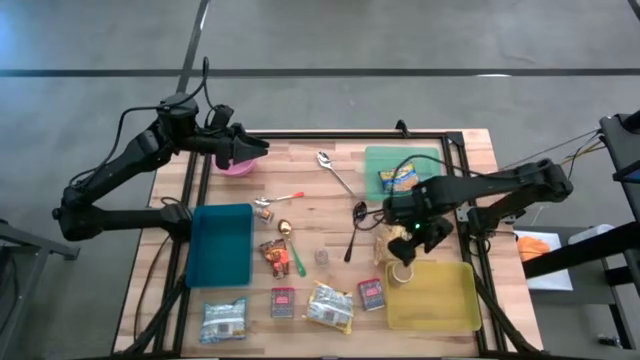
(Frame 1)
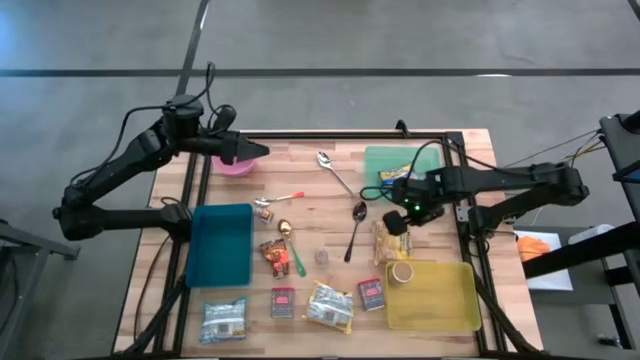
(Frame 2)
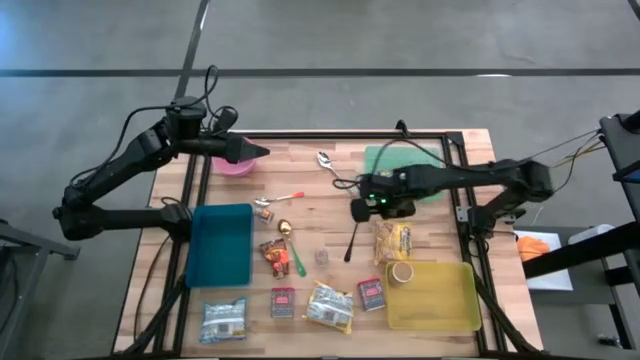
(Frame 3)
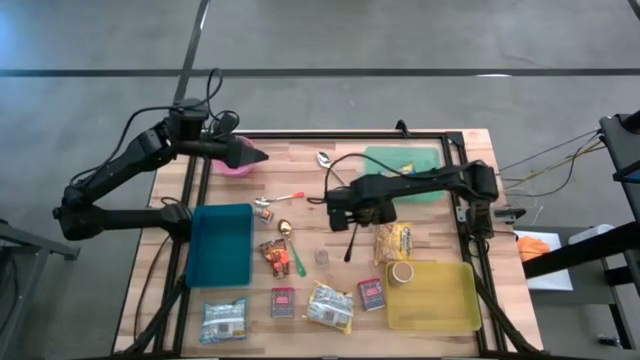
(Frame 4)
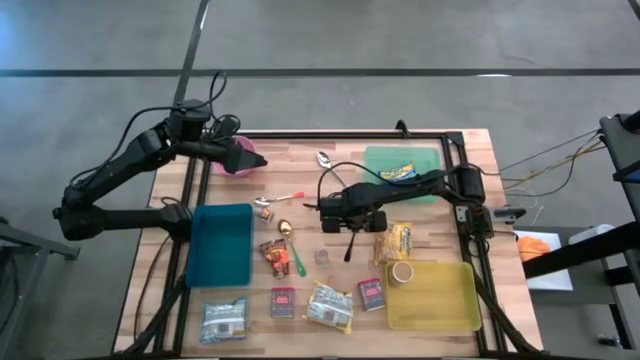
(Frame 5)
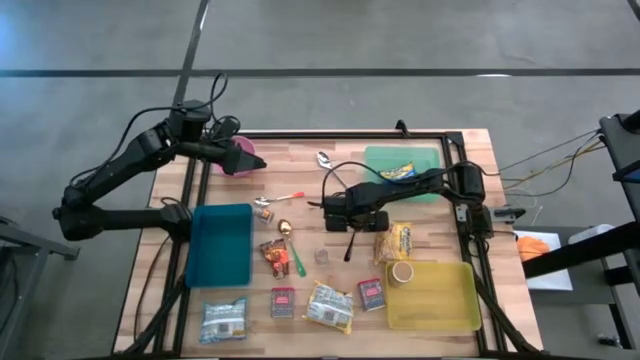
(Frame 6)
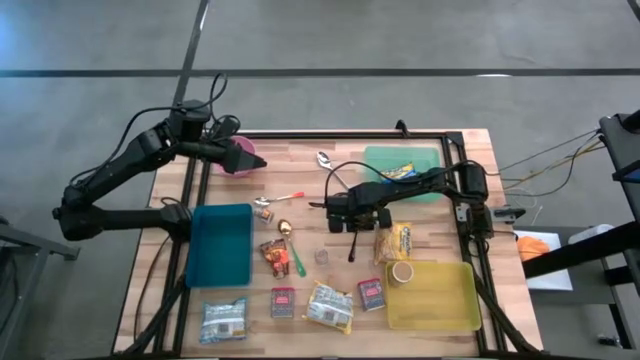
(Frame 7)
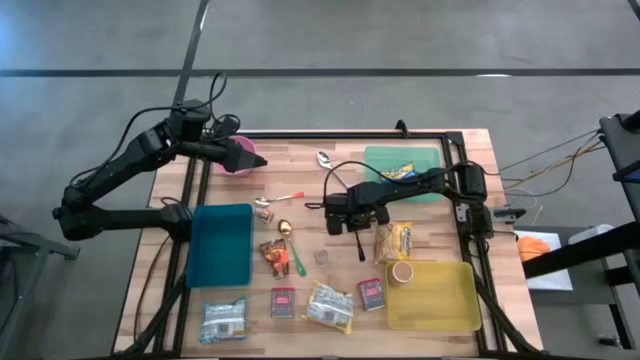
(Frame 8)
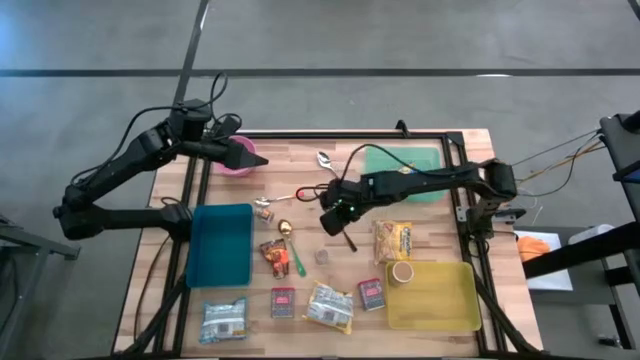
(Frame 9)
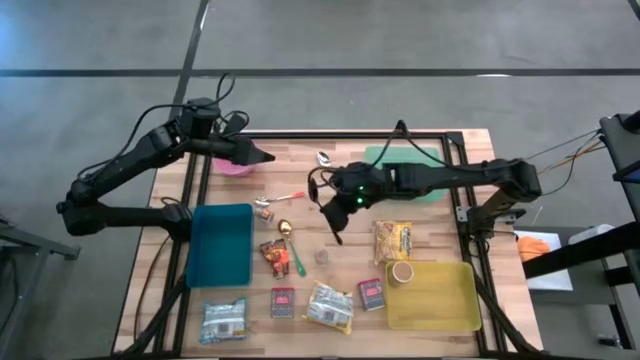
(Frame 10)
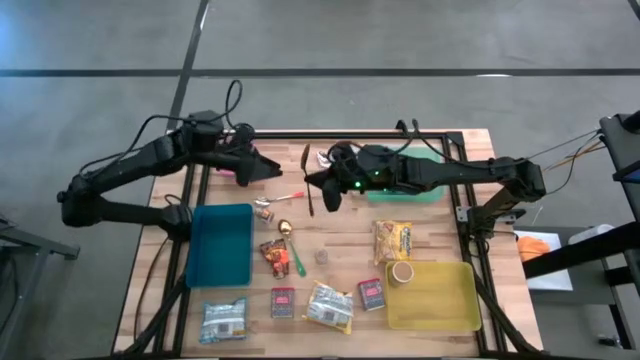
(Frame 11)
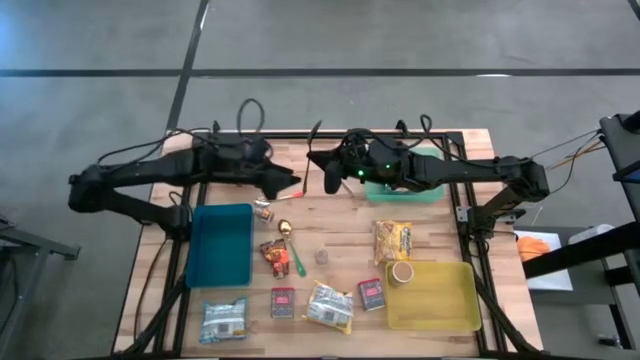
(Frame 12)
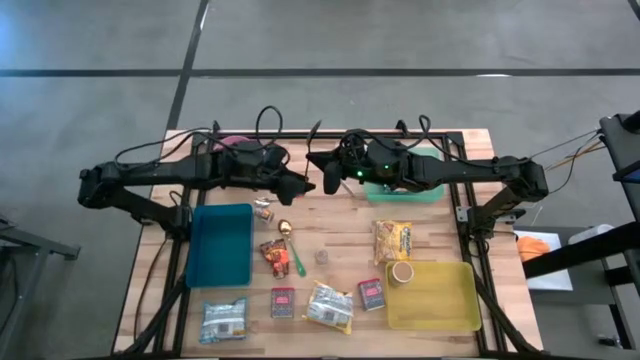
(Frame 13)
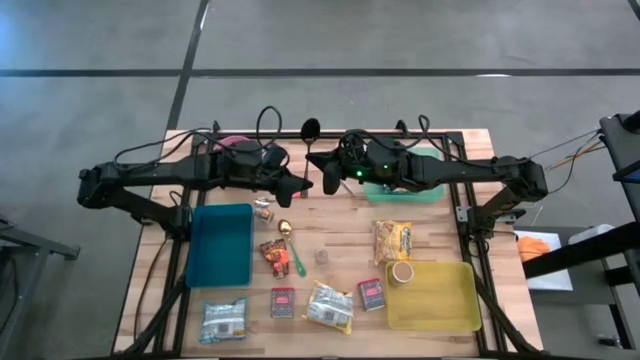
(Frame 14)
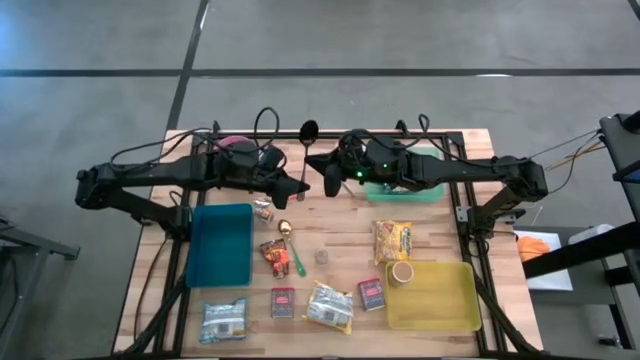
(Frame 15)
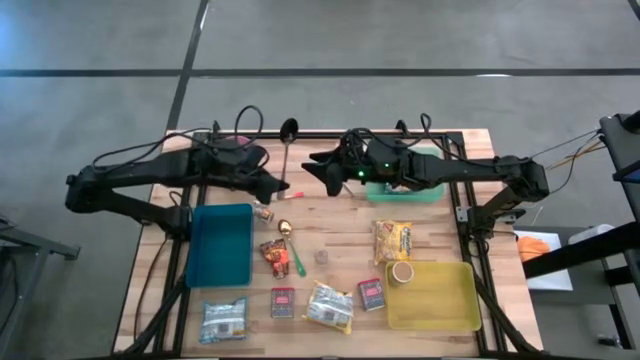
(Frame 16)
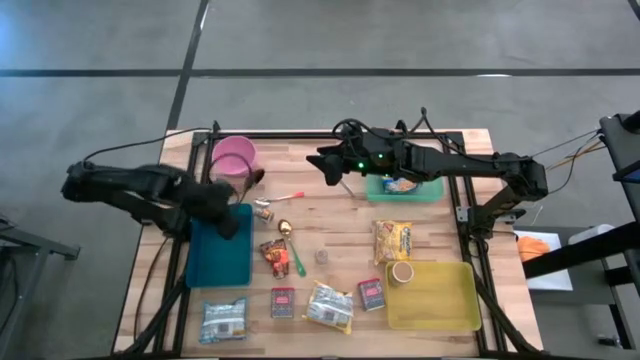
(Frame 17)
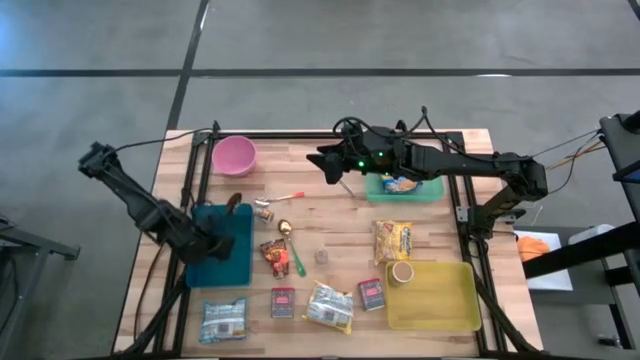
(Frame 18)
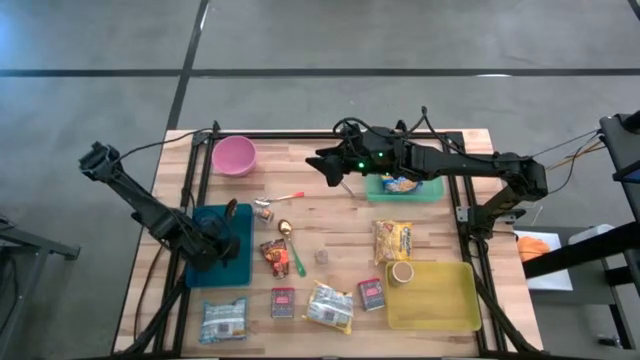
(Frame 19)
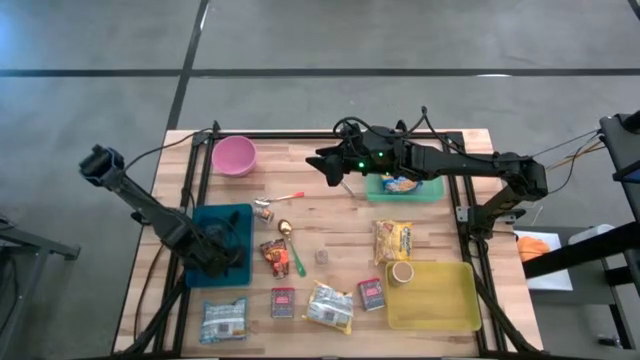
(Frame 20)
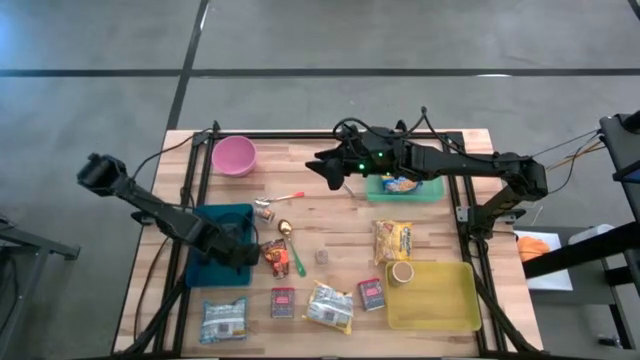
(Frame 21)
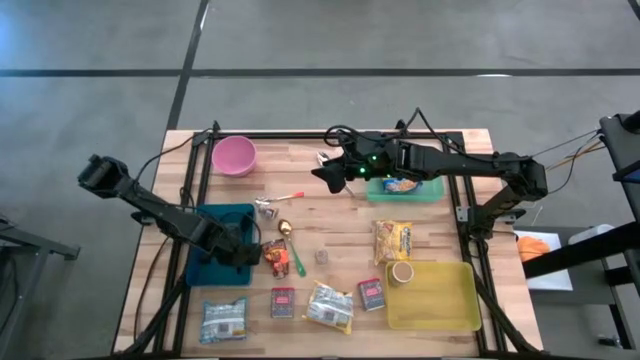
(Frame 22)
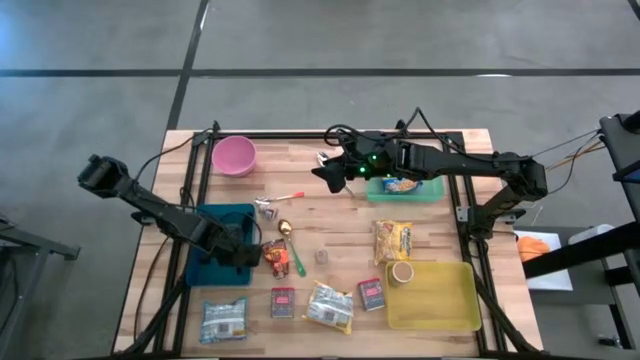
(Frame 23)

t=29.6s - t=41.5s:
Put the black spoon into the blue bin

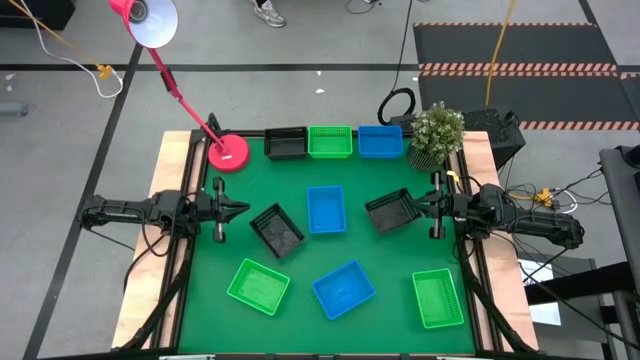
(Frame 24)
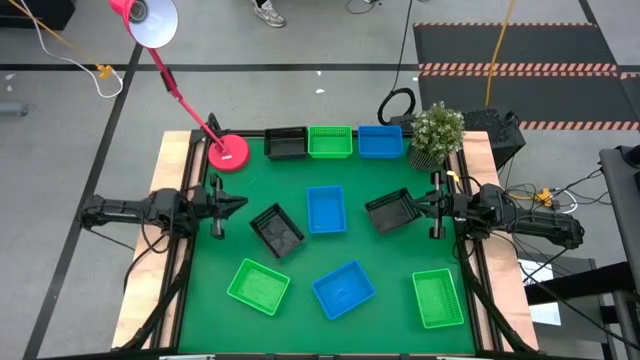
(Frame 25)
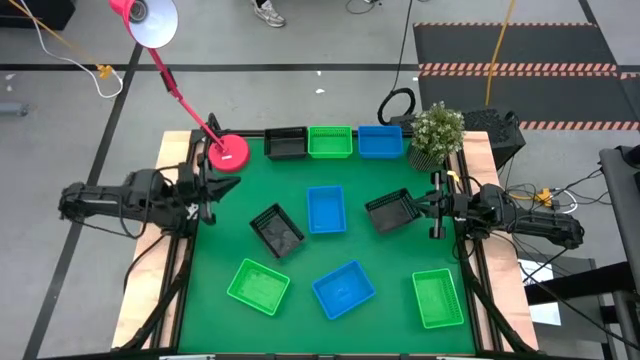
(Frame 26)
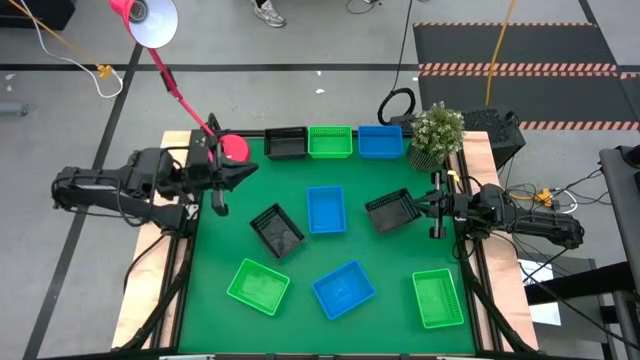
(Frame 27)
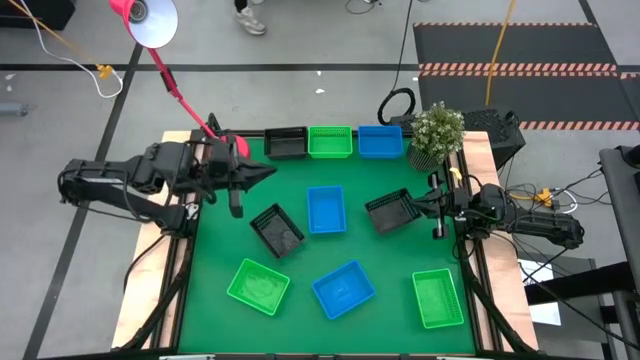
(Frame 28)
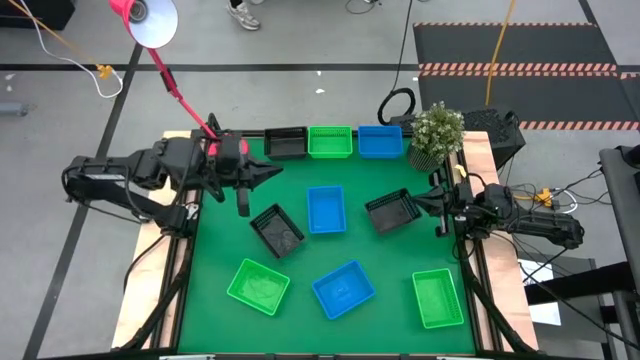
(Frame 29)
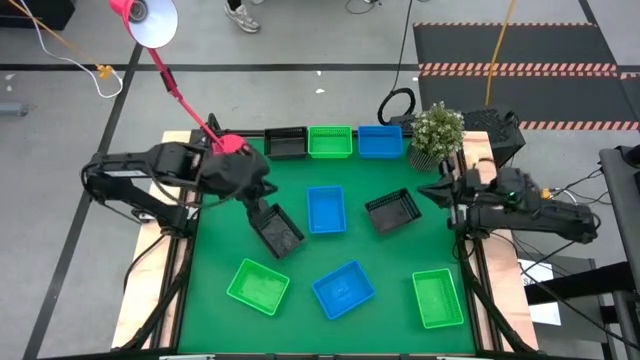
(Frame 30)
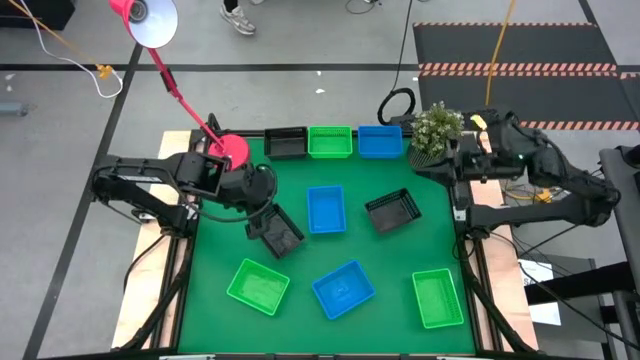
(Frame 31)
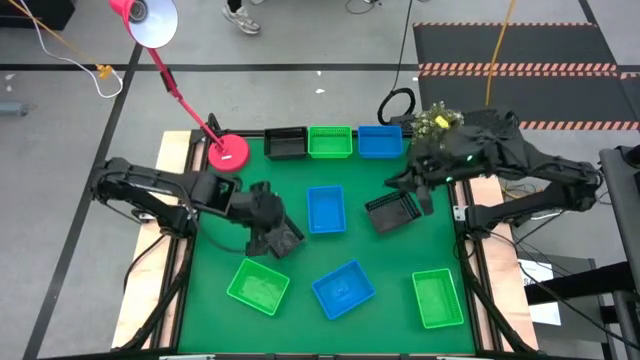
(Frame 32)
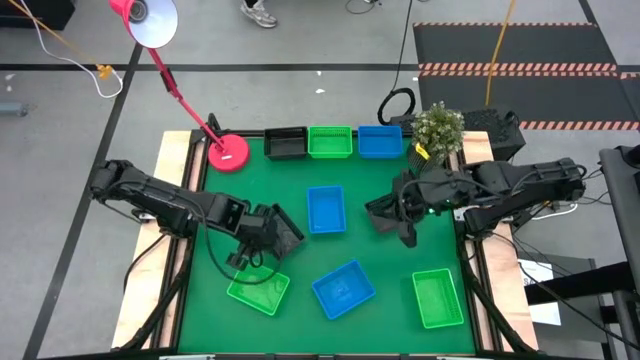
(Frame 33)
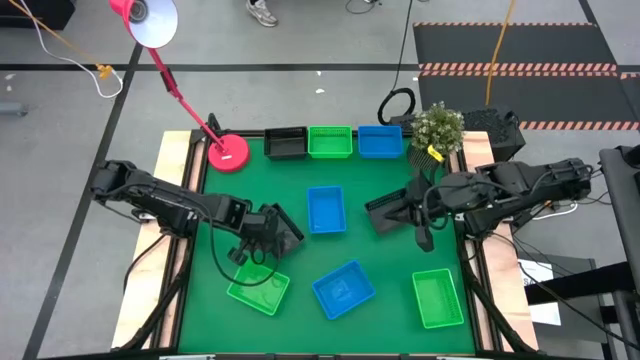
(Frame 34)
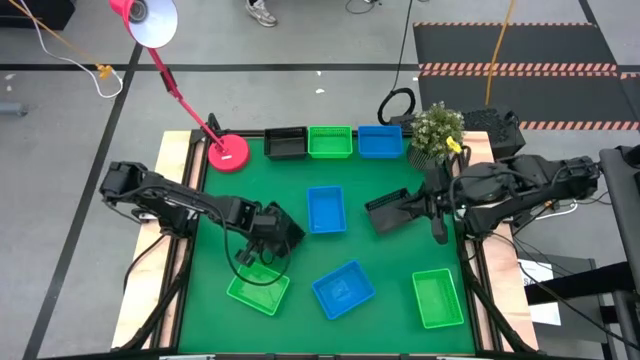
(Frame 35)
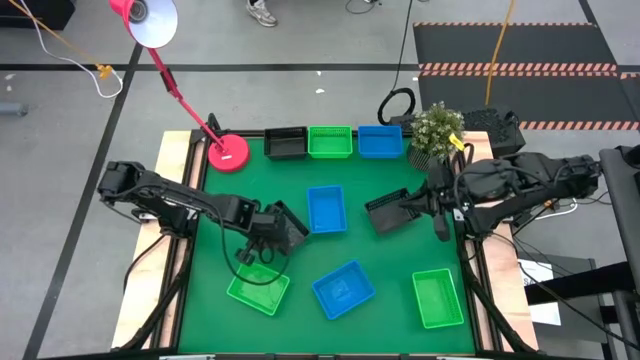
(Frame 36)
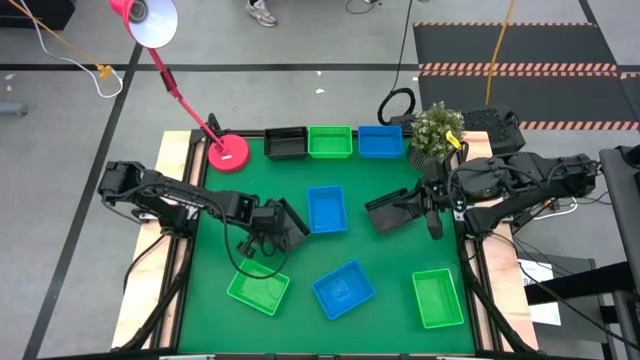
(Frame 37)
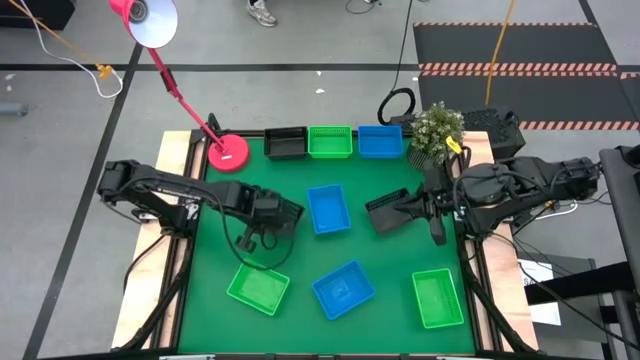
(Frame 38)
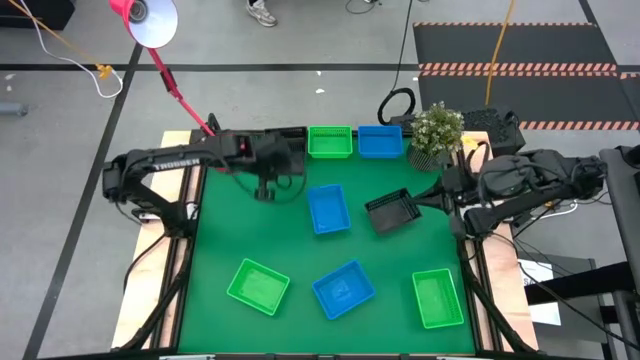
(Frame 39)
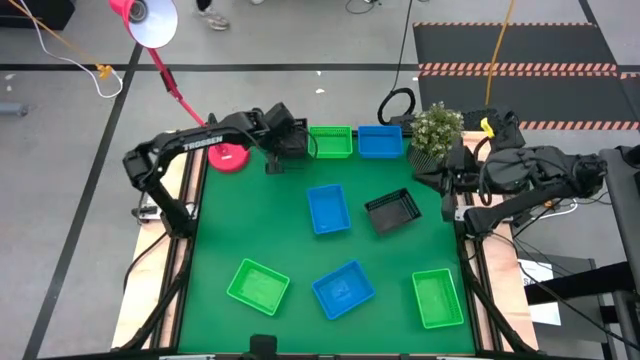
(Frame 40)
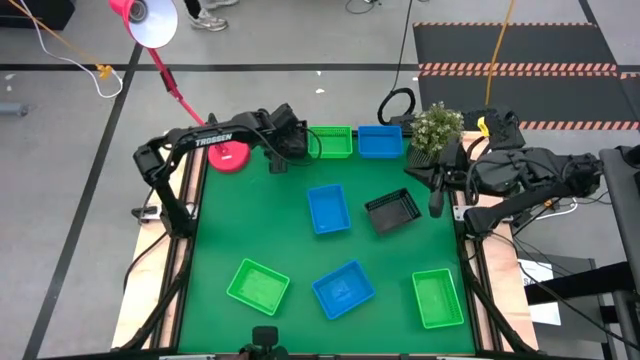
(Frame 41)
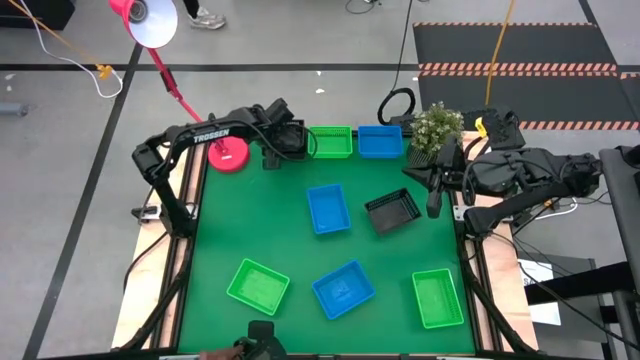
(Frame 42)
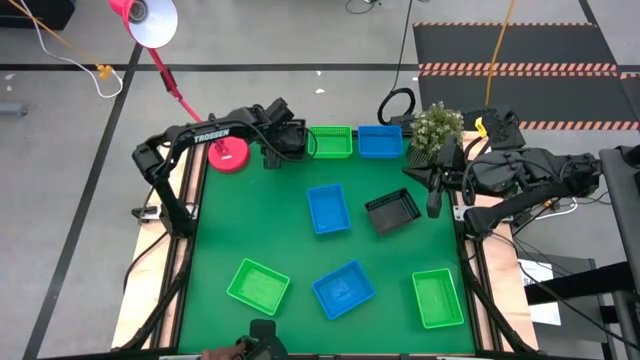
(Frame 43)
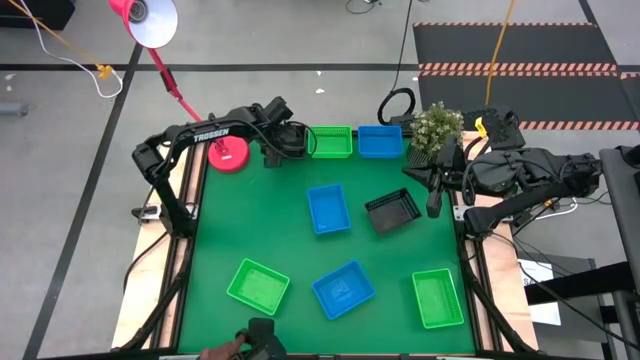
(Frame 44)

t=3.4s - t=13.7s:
Stack the bottom left black bin into the top black bin
